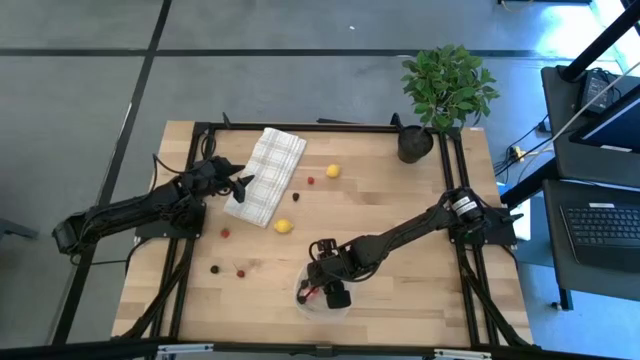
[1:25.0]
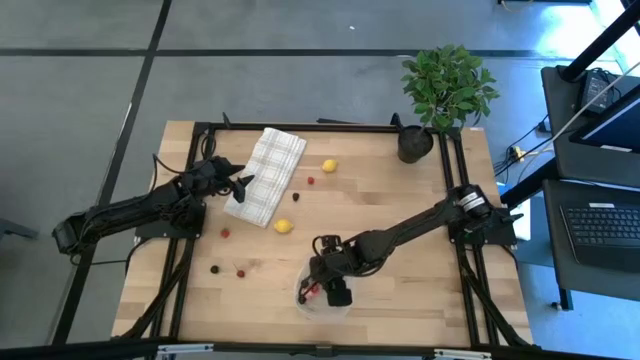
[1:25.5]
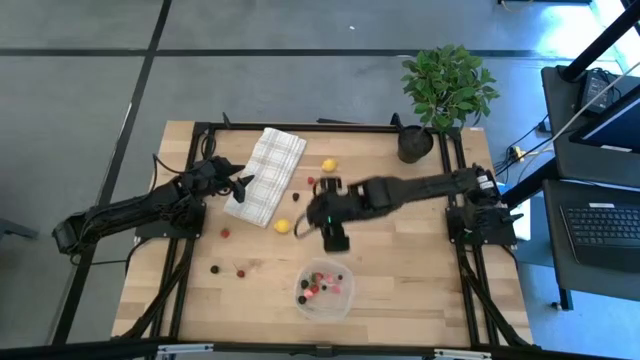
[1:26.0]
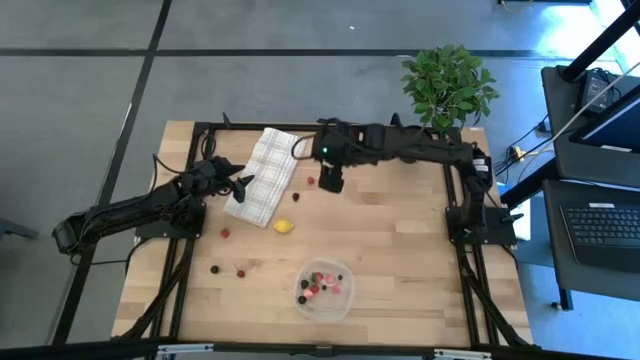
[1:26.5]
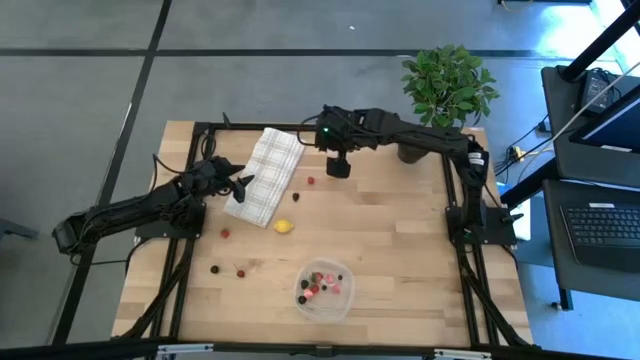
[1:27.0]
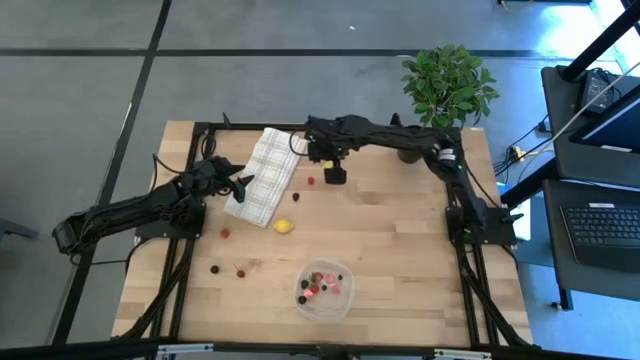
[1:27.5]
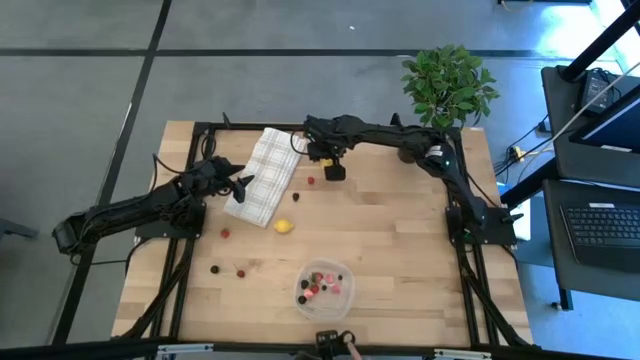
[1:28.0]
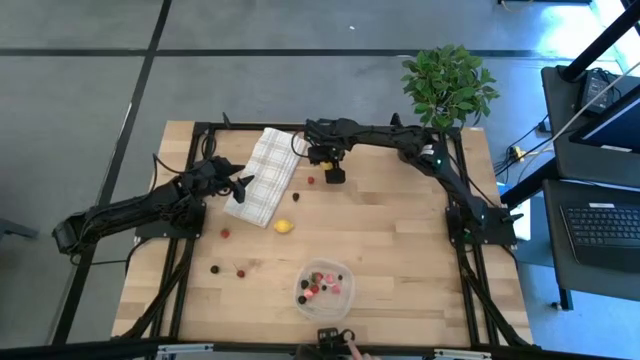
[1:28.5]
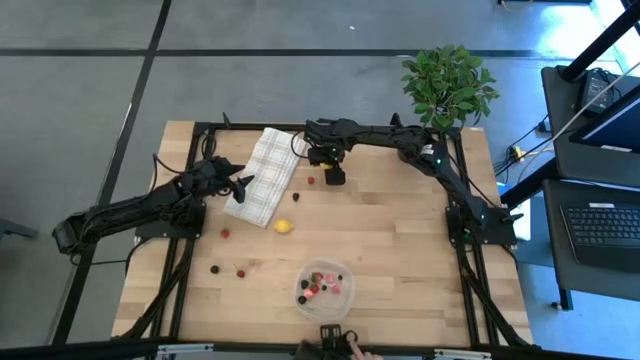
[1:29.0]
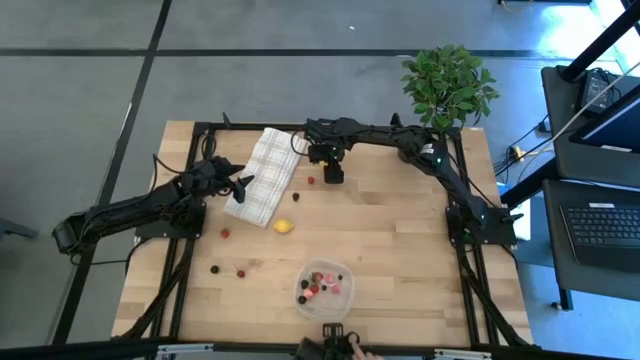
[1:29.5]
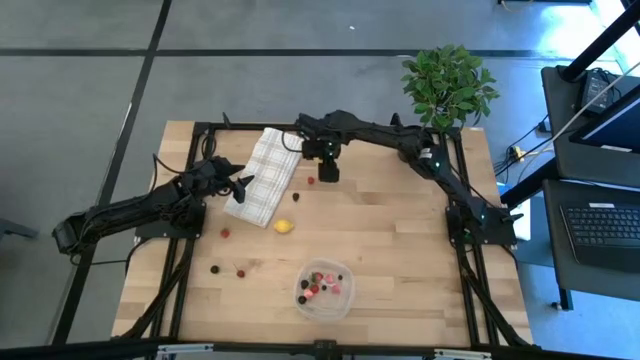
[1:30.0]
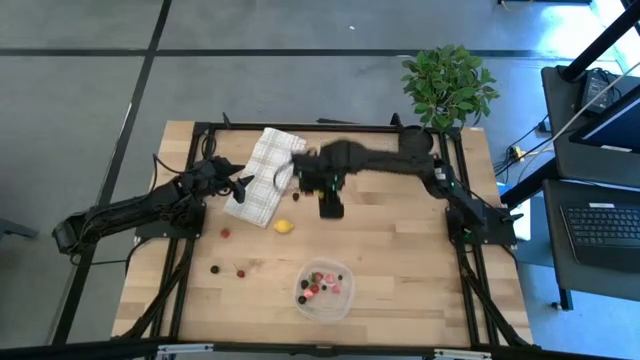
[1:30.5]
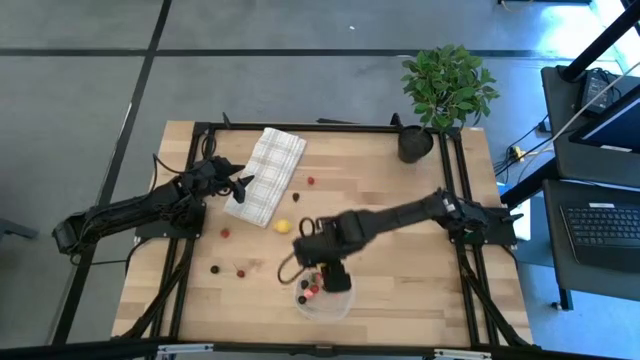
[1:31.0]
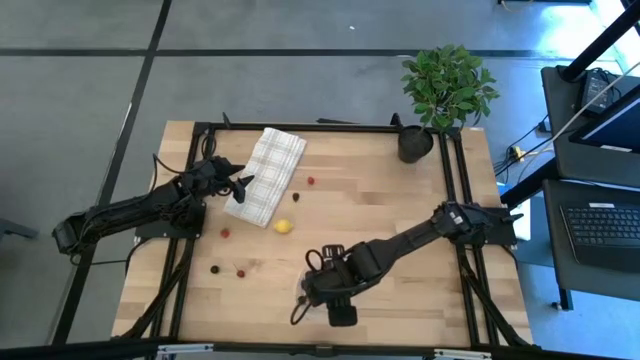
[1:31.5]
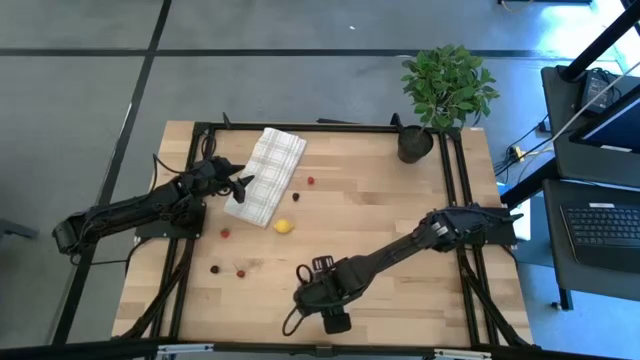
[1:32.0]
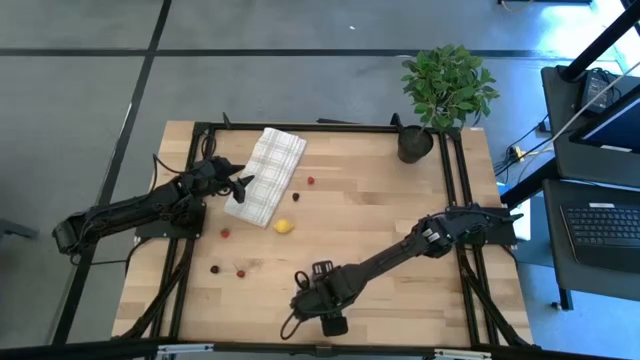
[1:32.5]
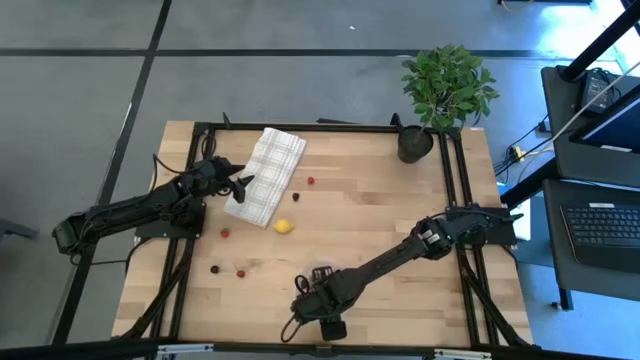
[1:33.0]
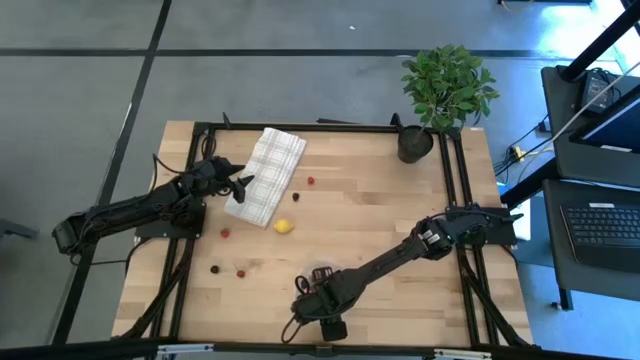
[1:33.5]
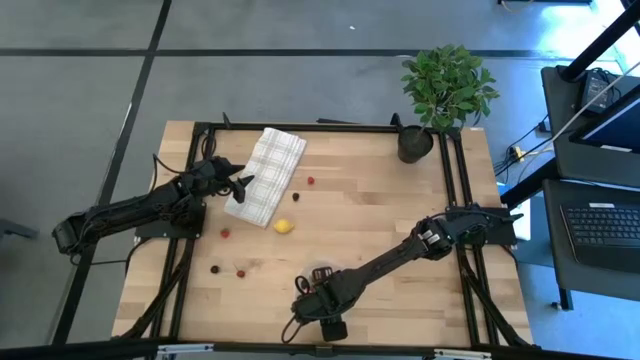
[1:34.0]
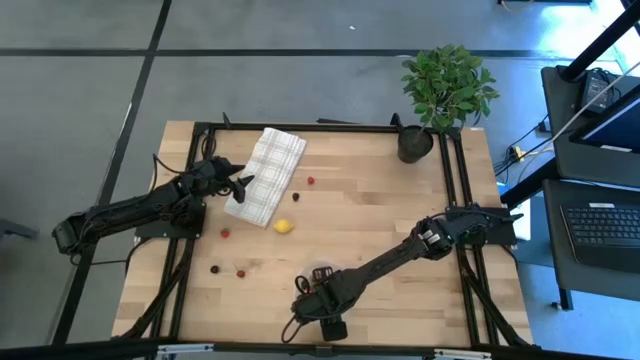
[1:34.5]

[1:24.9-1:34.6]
Task: Pick and placing Produce into tupperware
Put the top lemon into the transparent bin

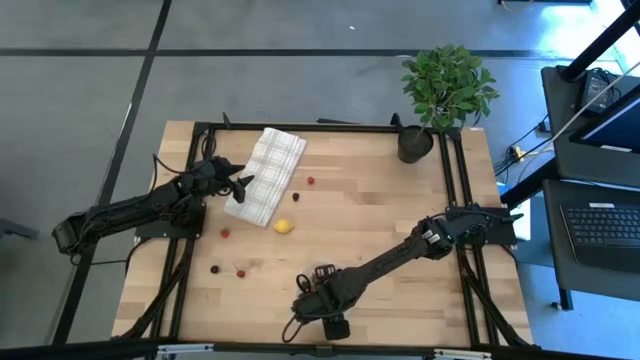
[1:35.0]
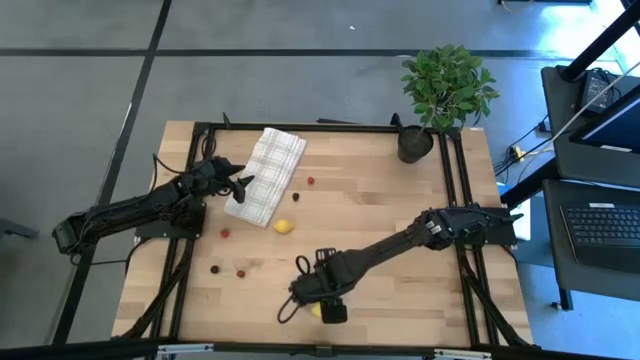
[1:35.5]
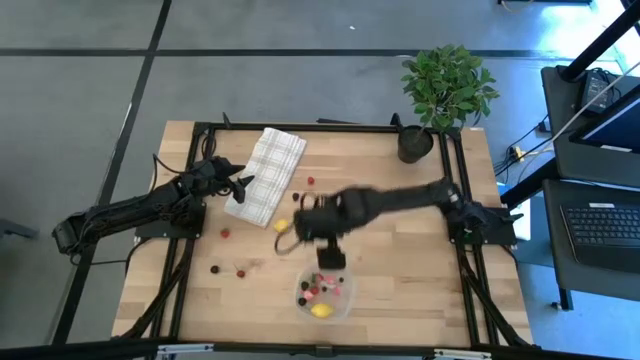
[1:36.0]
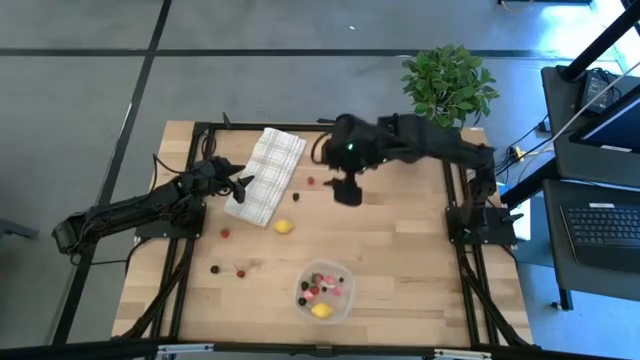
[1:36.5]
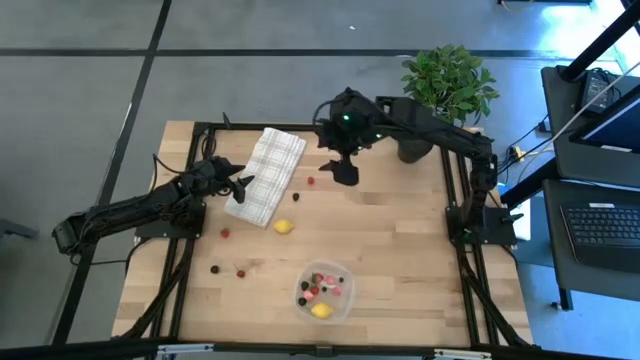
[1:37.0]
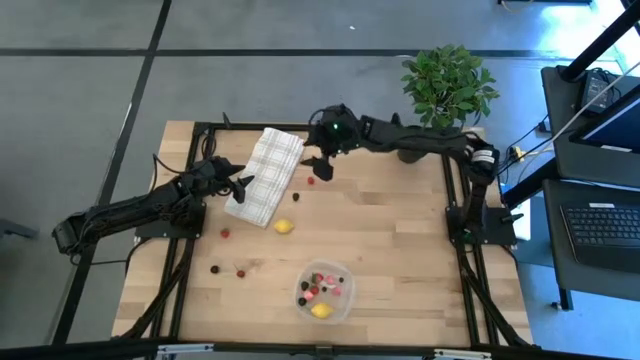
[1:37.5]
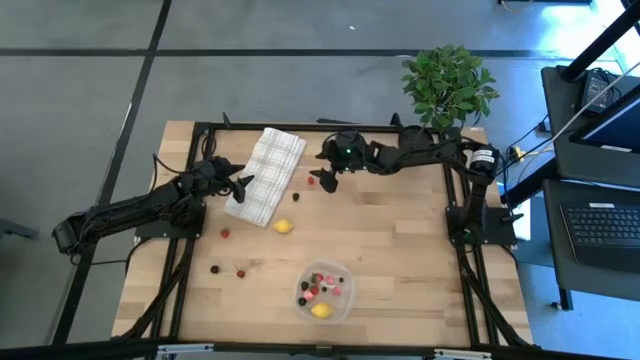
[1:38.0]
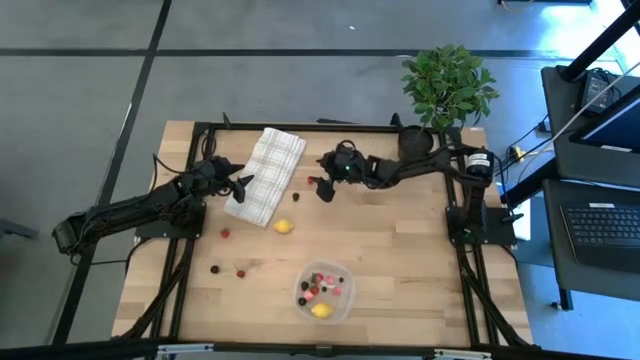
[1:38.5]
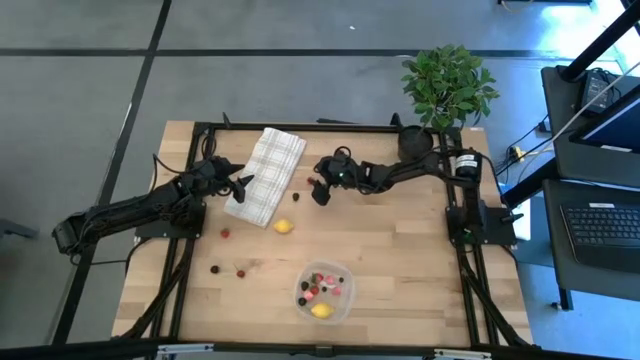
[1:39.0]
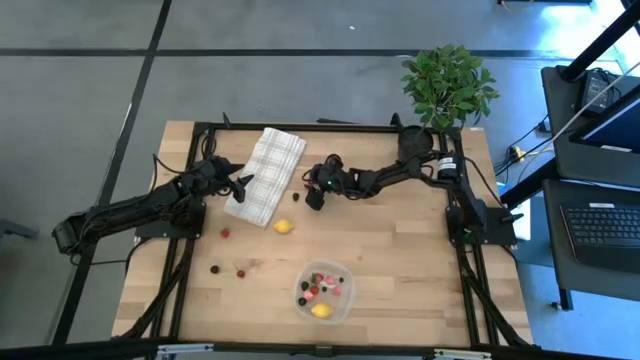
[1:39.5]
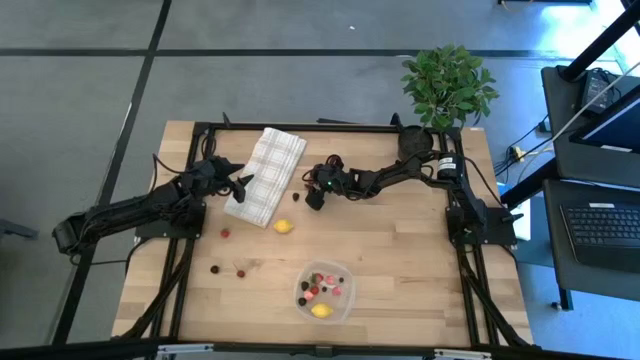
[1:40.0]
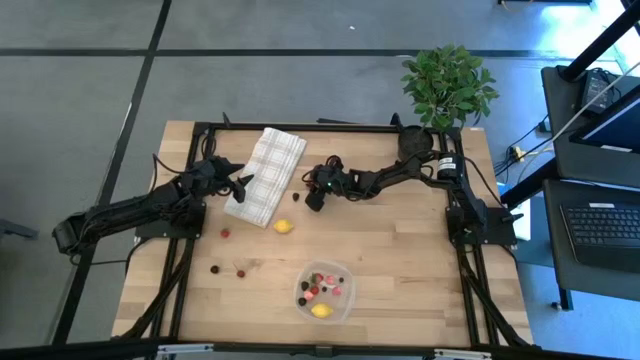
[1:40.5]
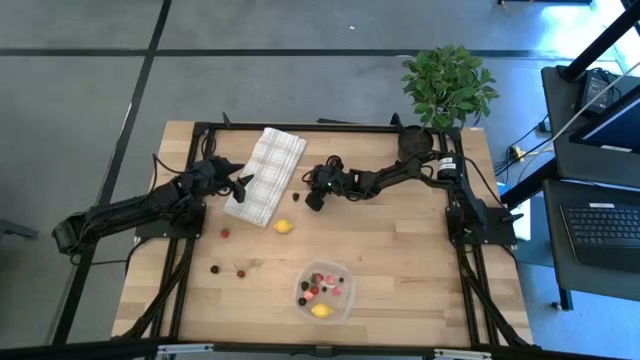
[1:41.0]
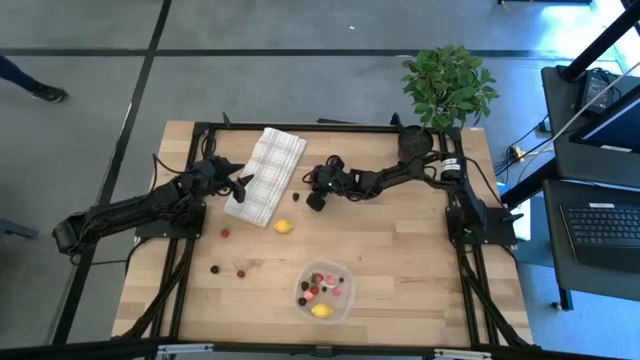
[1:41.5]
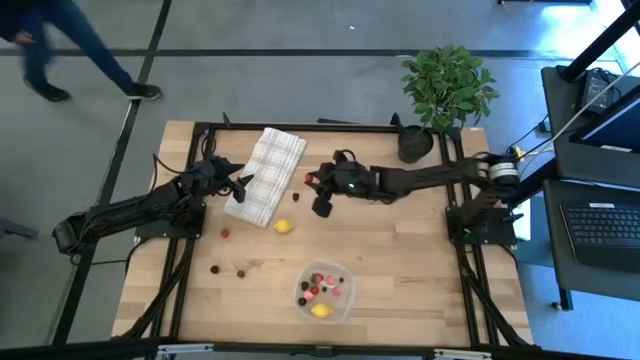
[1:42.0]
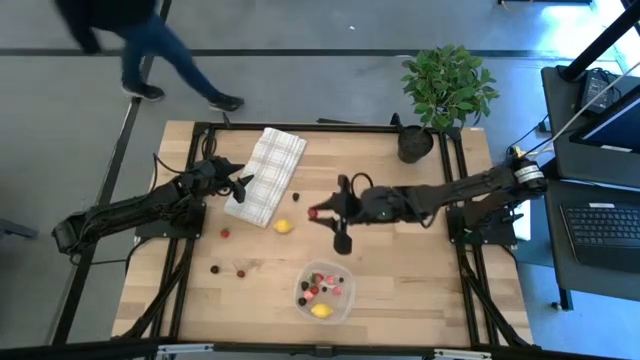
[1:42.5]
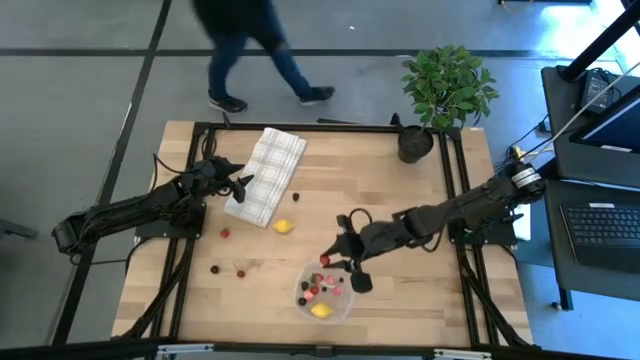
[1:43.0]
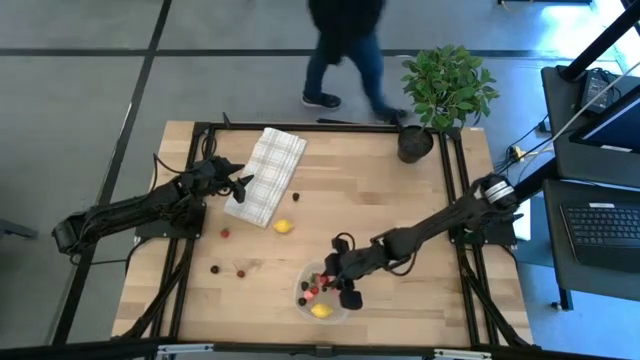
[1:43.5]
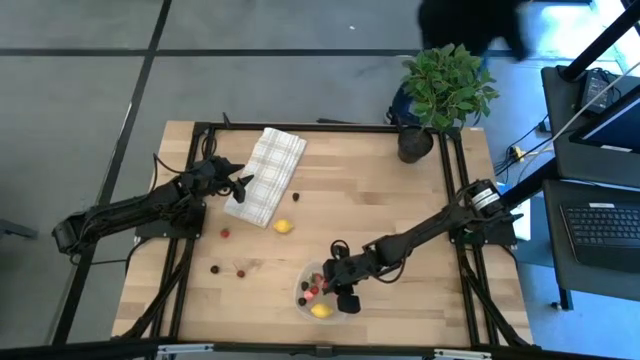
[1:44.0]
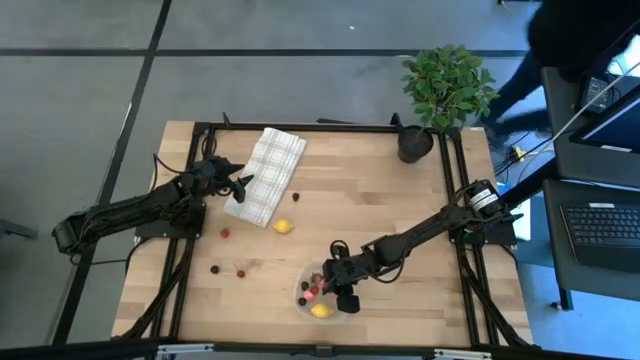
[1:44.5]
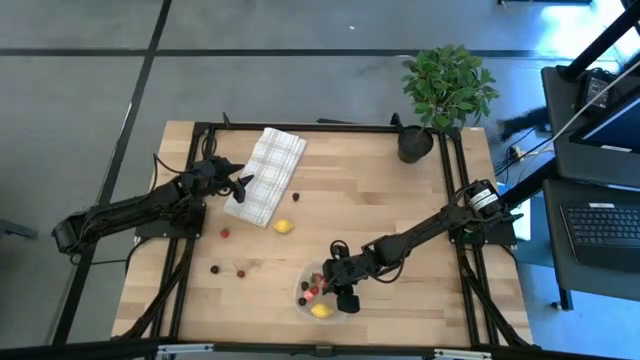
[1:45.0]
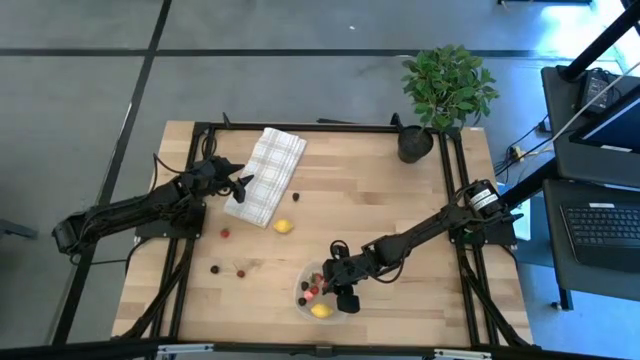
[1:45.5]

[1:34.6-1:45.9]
Put the red raspberry into the transparent bin

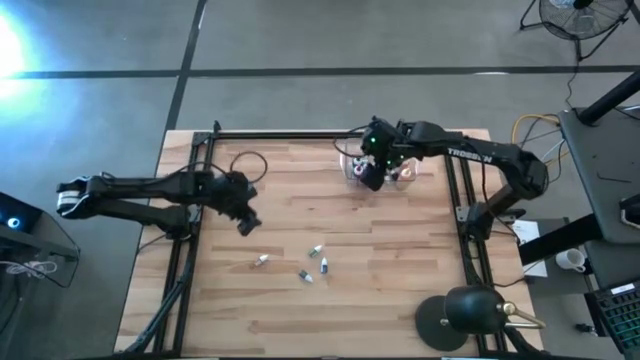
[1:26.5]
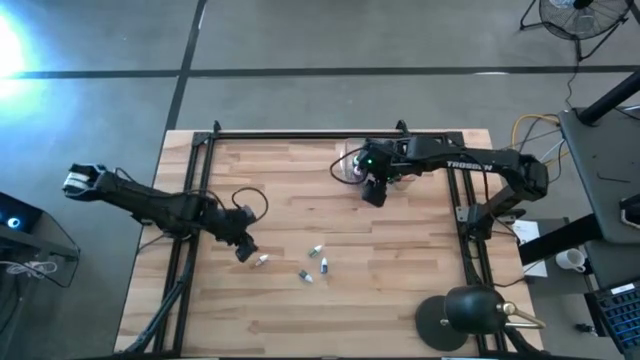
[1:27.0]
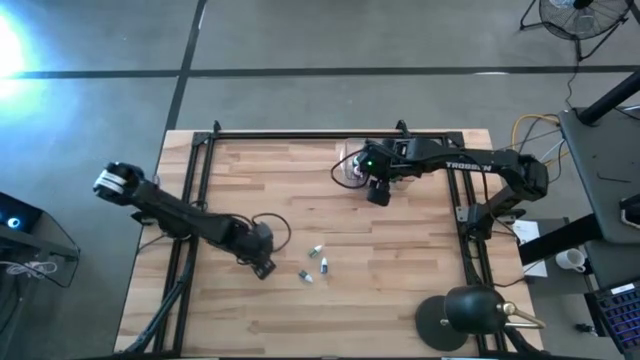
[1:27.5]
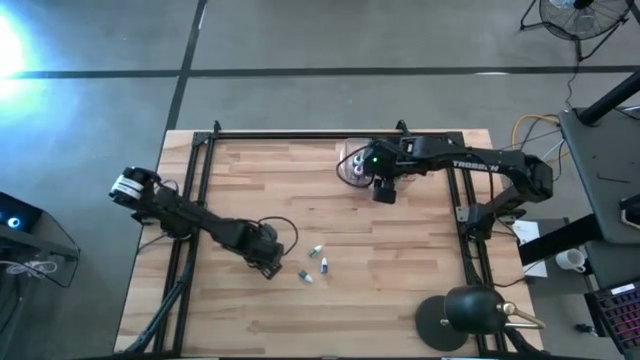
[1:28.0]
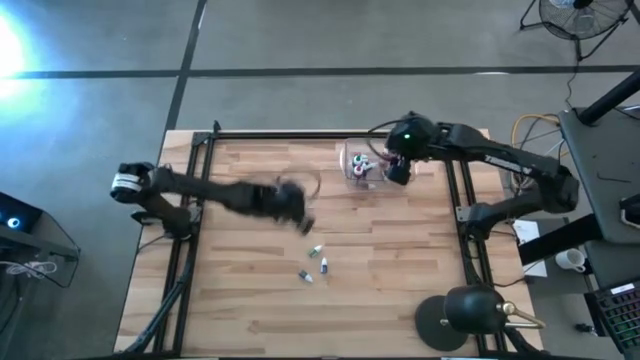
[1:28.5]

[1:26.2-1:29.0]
Task: Pick & Place food coloring
Put the small orange food coloring bottle into the transparent bin
